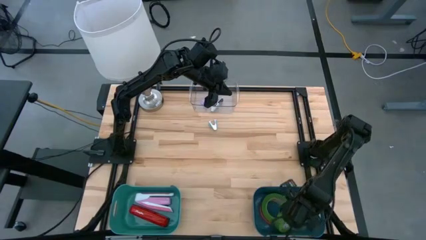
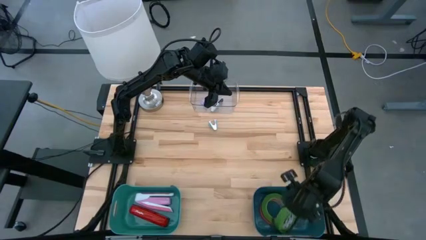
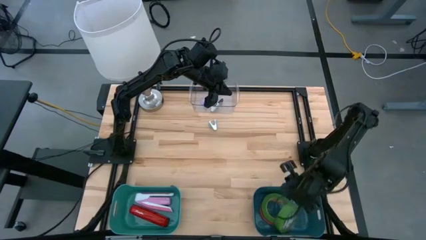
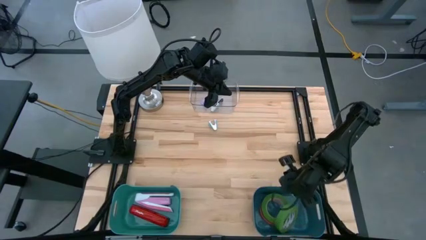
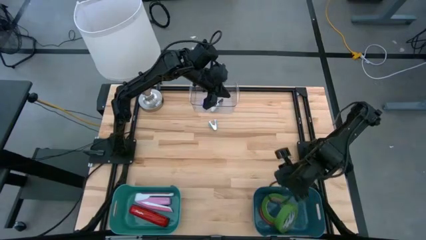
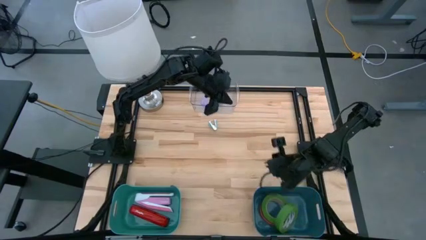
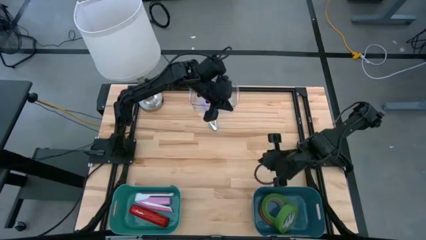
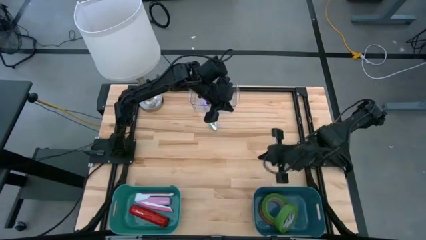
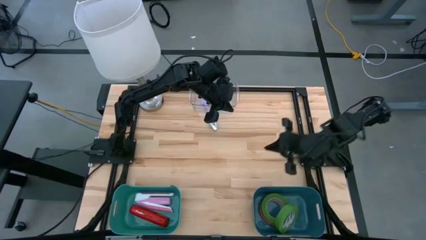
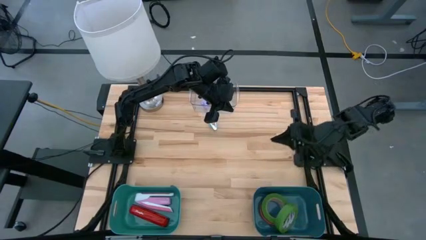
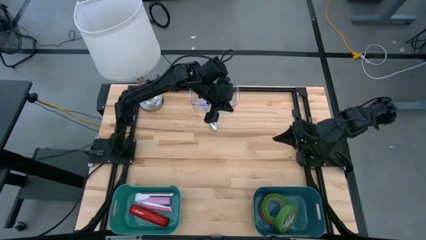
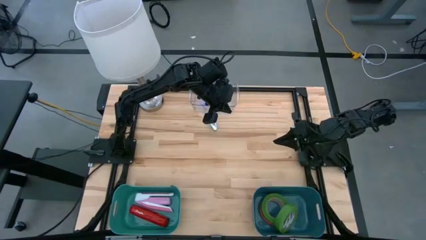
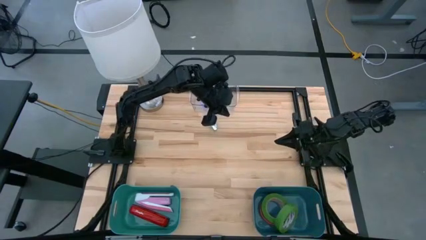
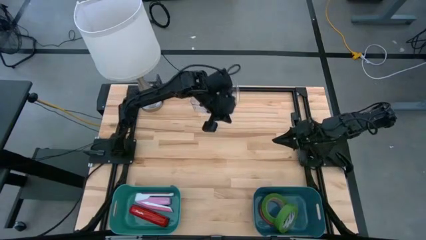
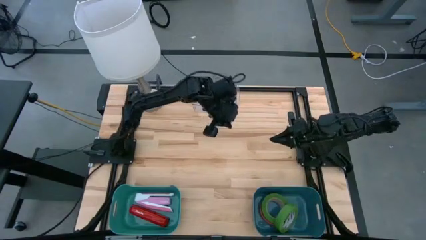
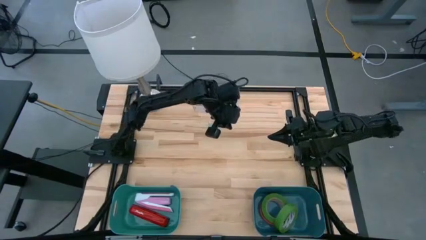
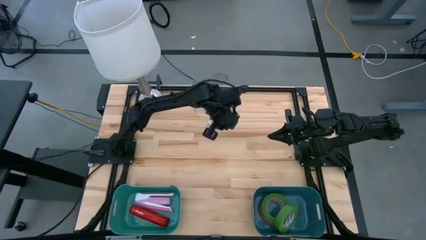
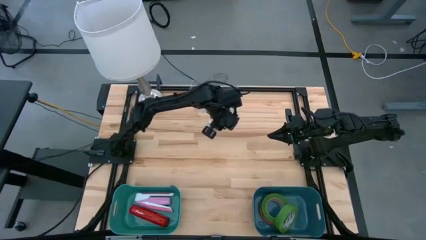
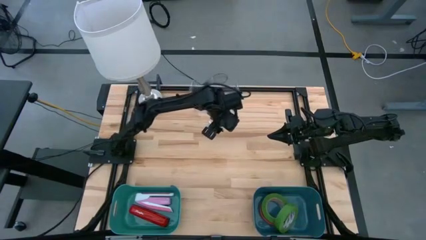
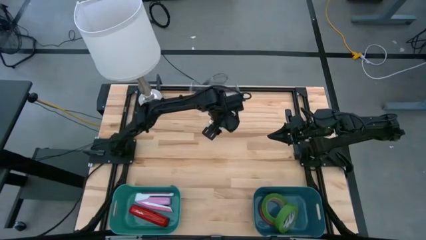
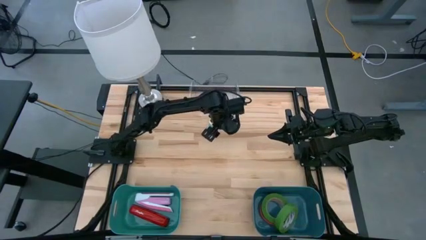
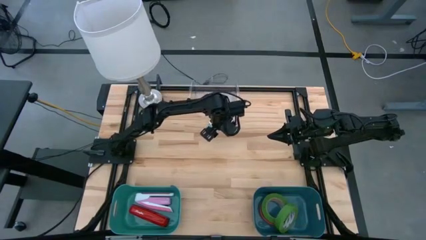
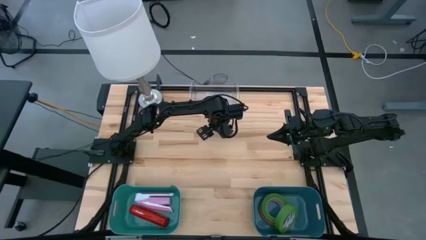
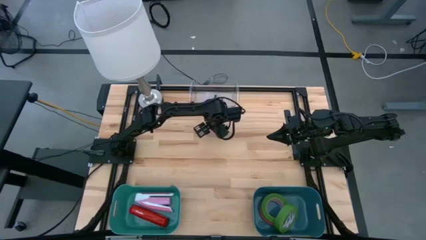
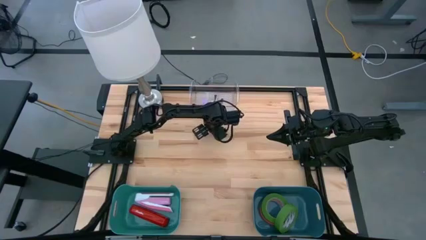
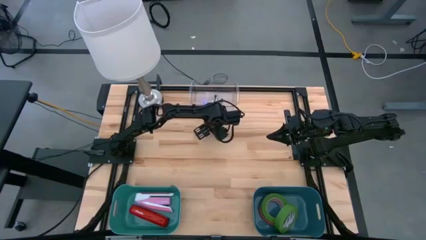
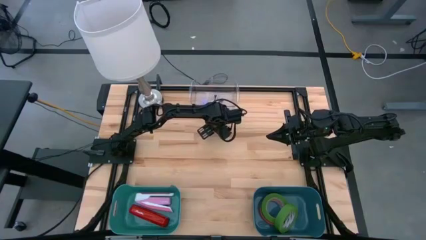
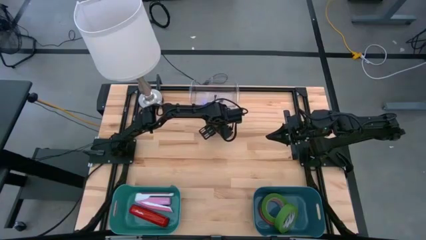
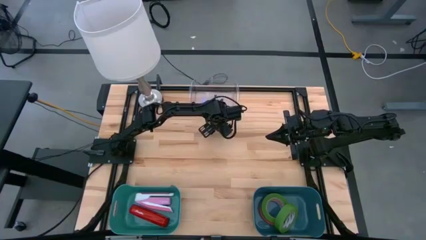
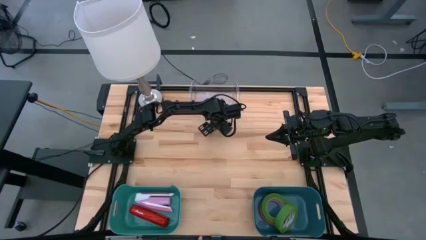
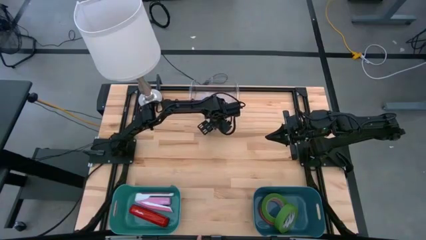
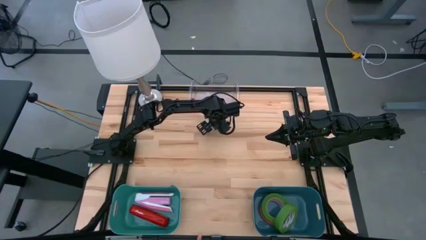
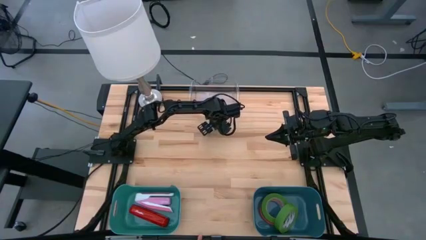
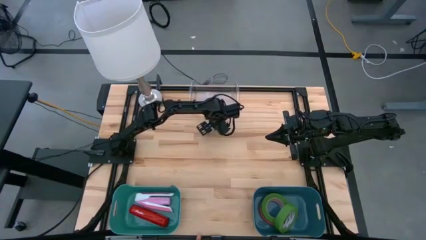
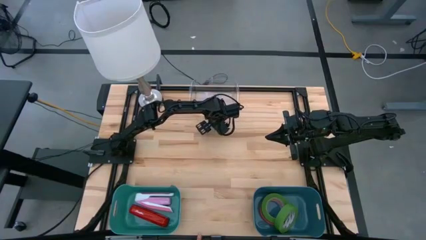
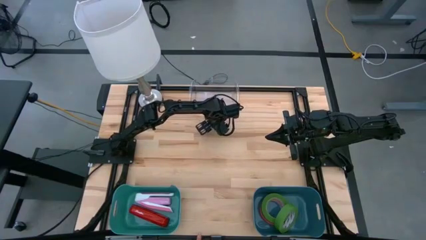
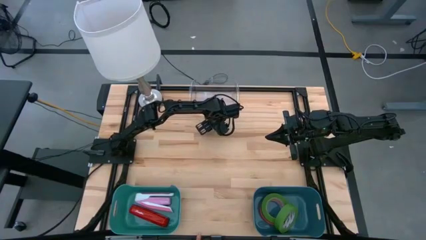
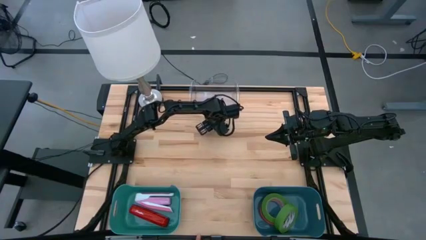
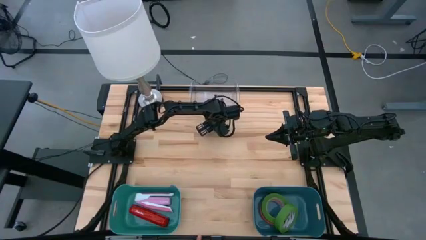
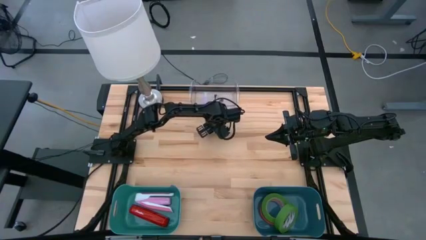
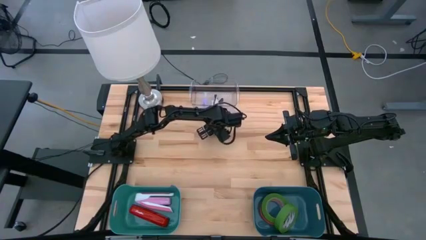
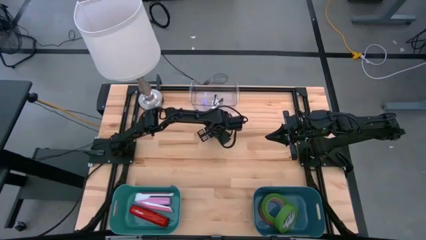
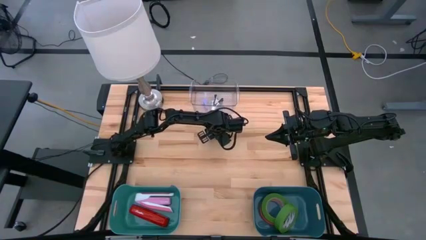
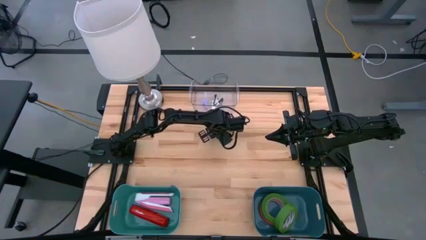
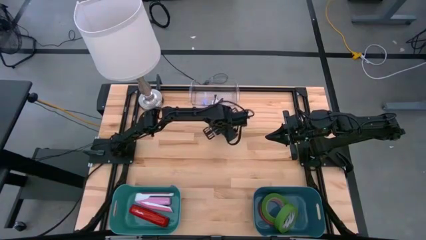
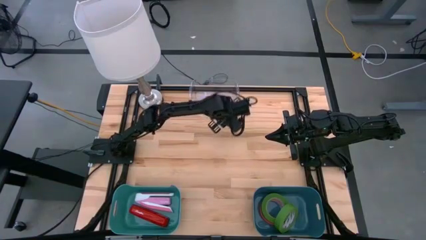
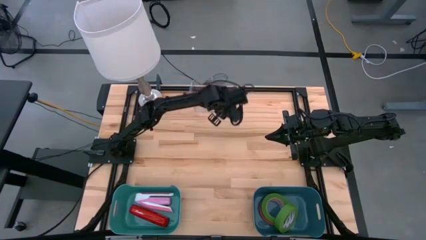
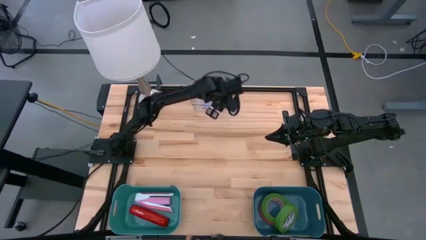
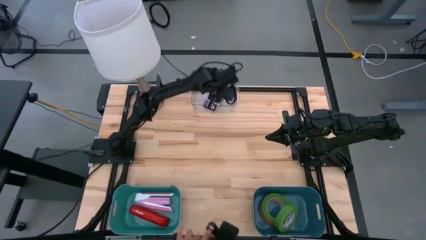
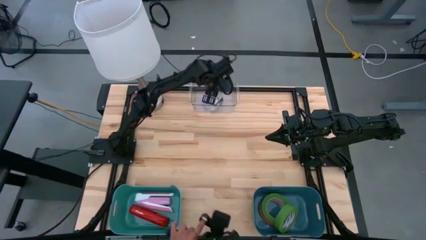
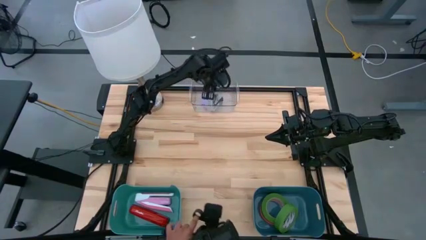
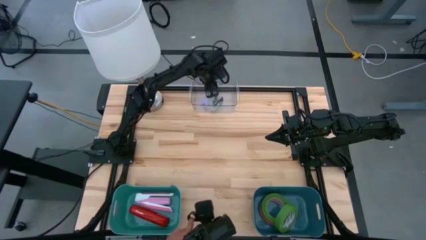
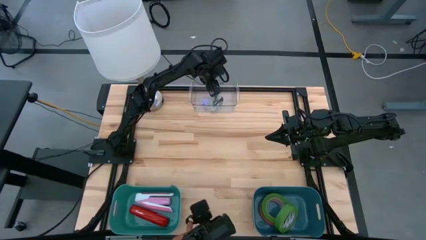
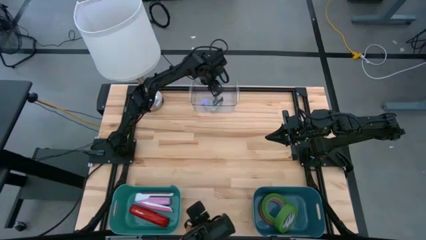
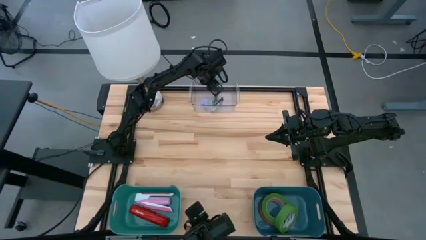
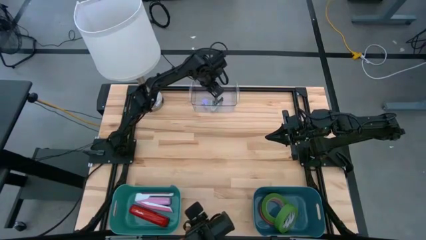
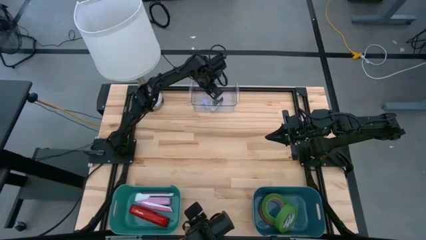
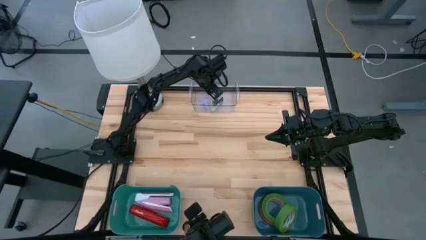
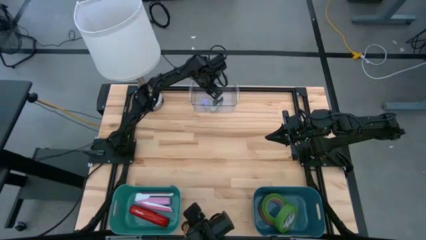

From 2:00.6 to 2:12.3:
Task: Pick and place Stapler, Stapler remover, tape
Put the light blue staple remover into the transparent bin
